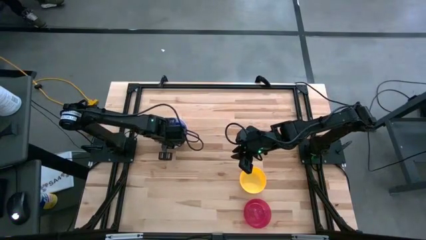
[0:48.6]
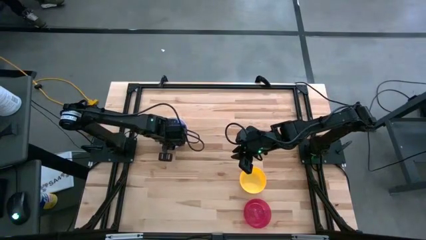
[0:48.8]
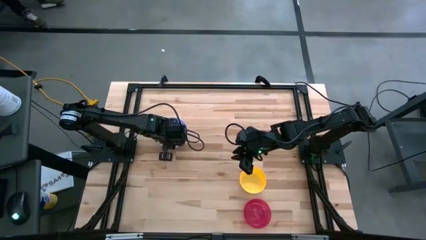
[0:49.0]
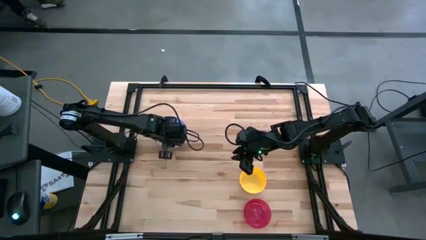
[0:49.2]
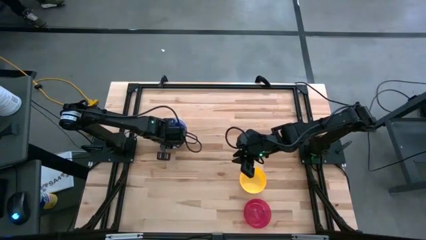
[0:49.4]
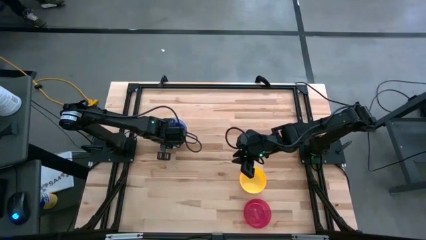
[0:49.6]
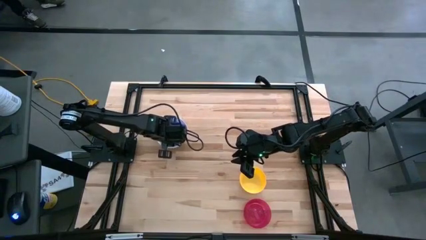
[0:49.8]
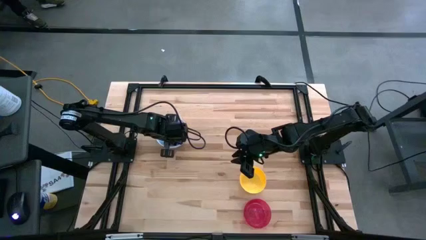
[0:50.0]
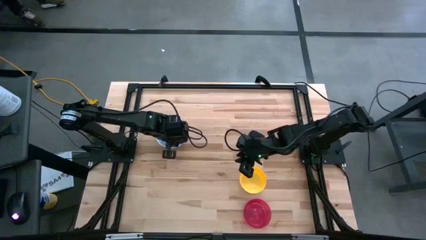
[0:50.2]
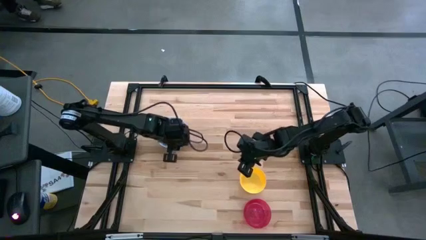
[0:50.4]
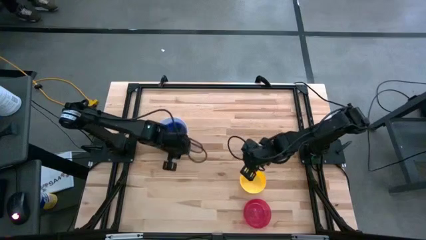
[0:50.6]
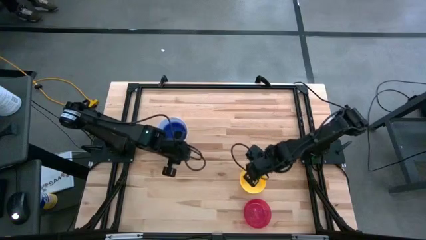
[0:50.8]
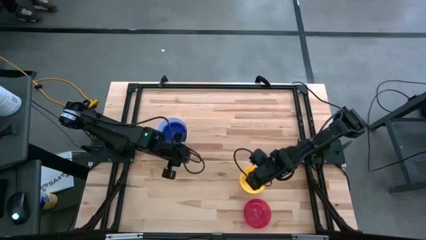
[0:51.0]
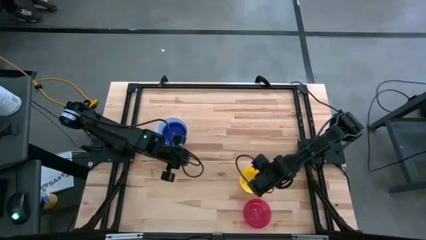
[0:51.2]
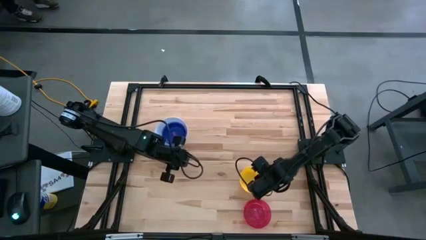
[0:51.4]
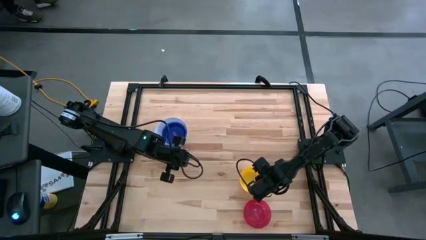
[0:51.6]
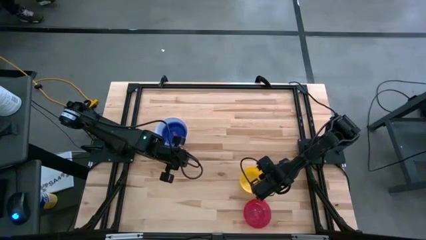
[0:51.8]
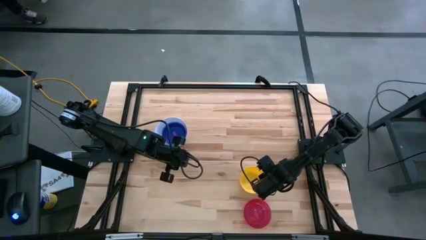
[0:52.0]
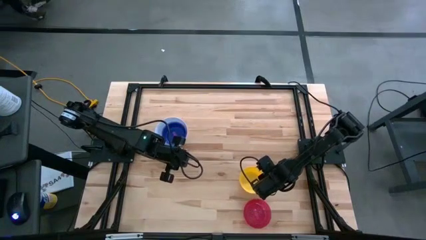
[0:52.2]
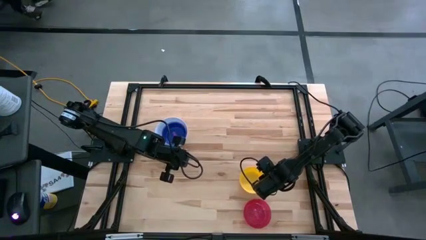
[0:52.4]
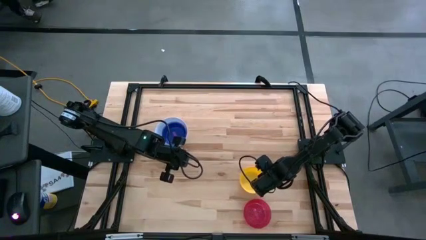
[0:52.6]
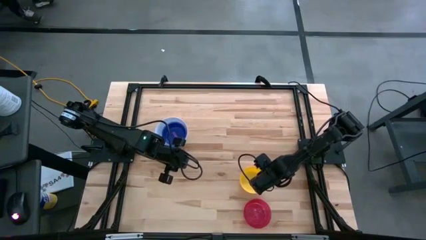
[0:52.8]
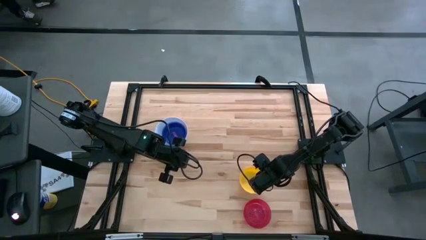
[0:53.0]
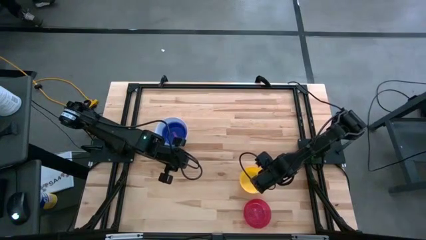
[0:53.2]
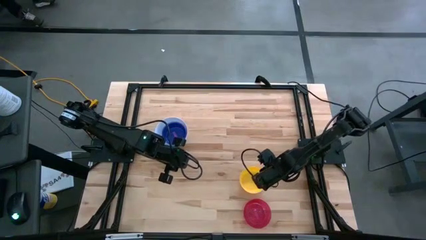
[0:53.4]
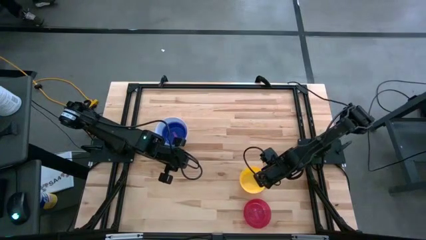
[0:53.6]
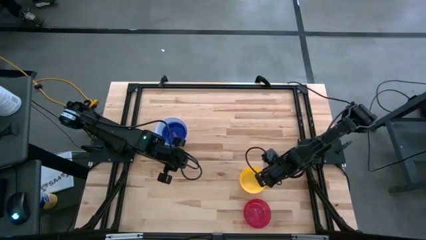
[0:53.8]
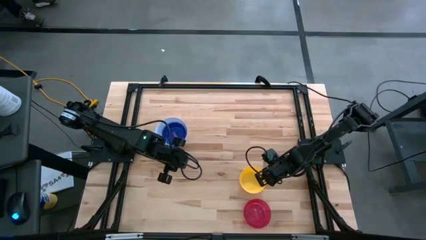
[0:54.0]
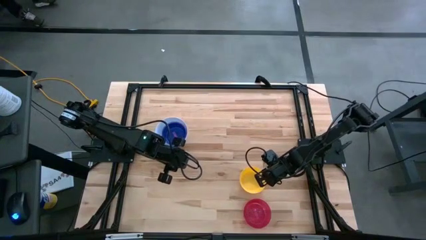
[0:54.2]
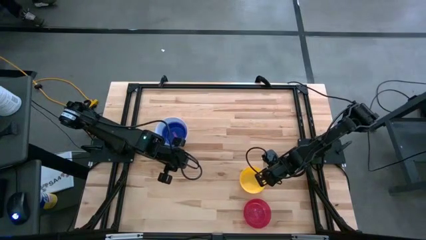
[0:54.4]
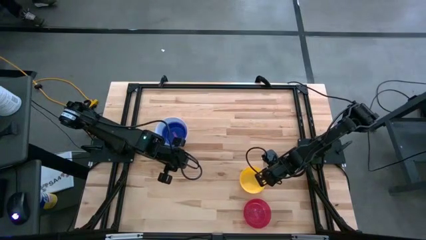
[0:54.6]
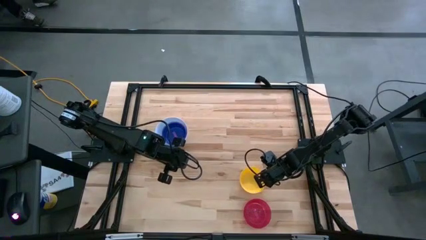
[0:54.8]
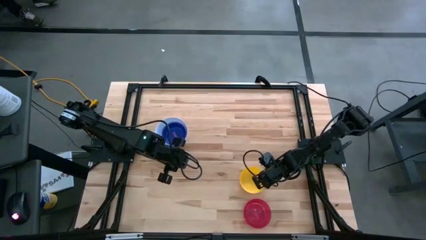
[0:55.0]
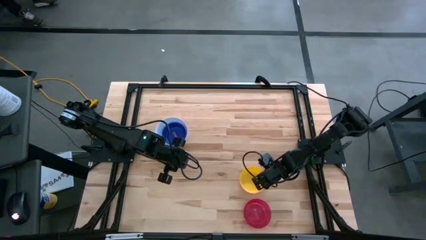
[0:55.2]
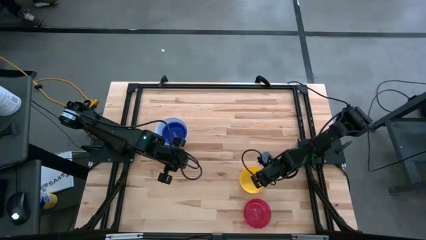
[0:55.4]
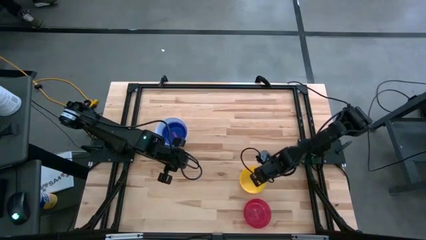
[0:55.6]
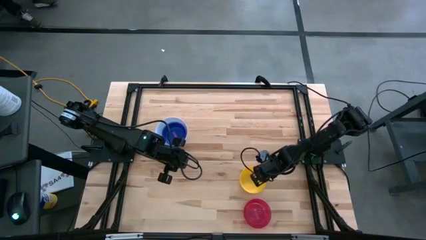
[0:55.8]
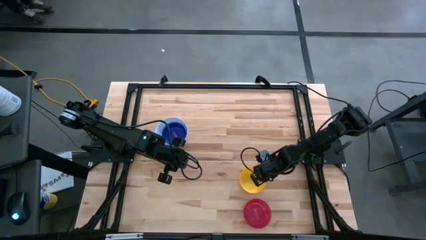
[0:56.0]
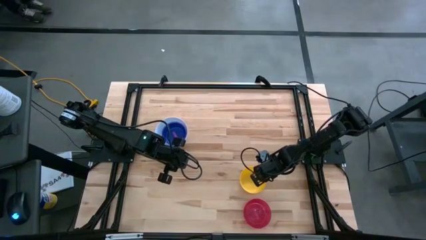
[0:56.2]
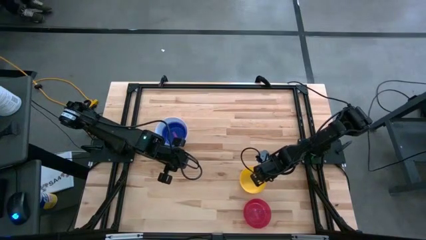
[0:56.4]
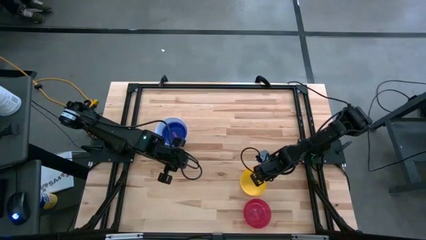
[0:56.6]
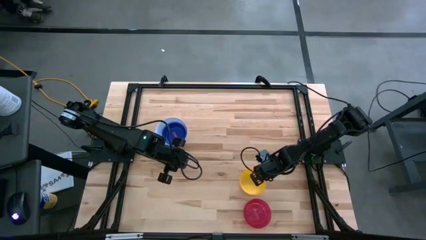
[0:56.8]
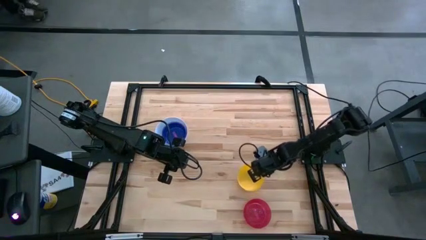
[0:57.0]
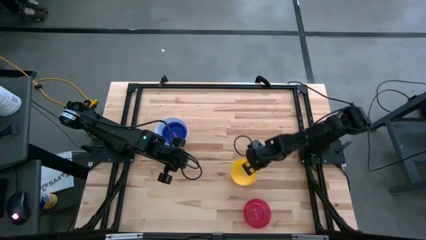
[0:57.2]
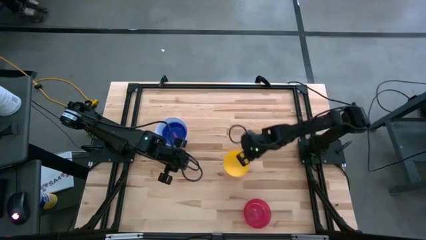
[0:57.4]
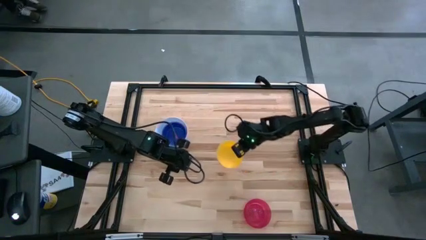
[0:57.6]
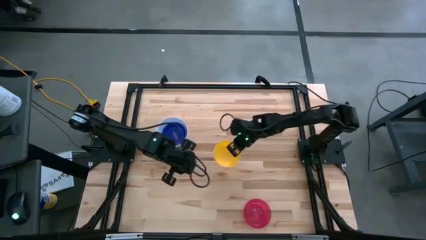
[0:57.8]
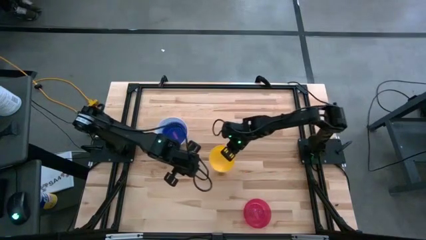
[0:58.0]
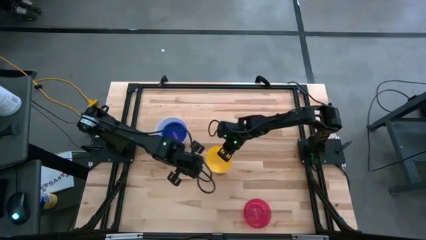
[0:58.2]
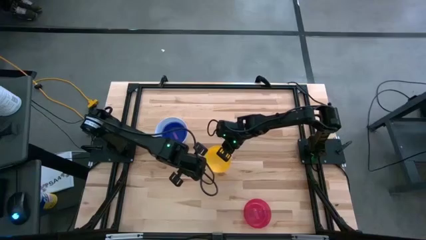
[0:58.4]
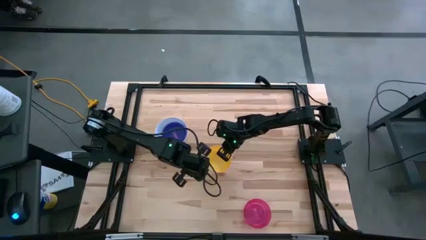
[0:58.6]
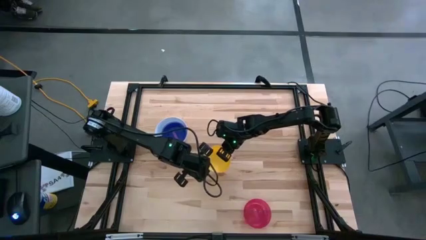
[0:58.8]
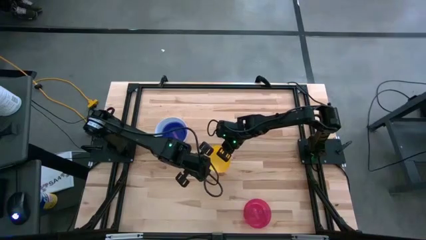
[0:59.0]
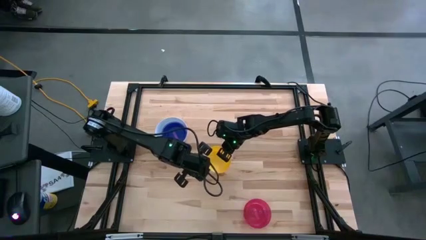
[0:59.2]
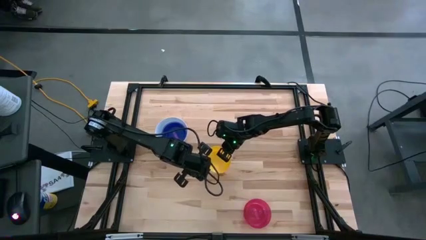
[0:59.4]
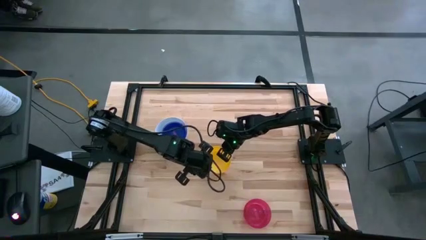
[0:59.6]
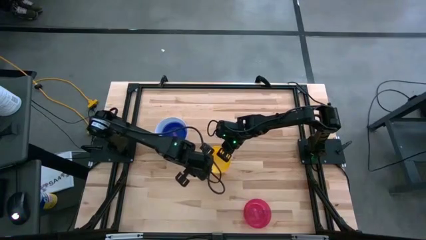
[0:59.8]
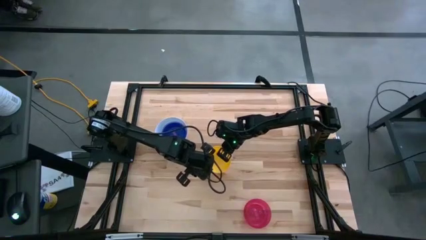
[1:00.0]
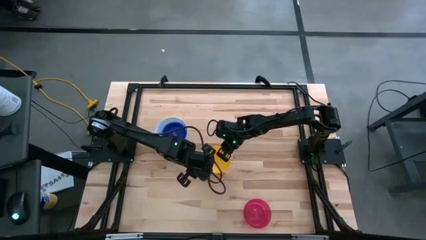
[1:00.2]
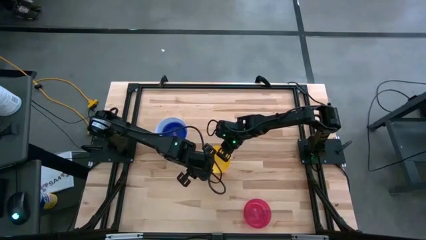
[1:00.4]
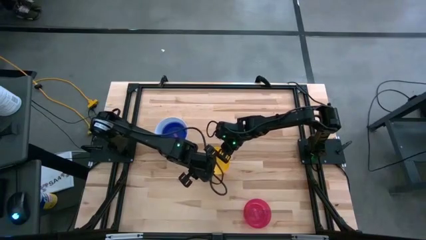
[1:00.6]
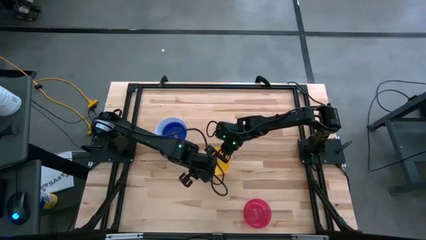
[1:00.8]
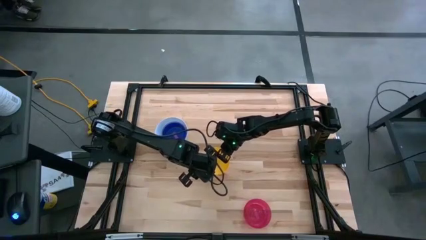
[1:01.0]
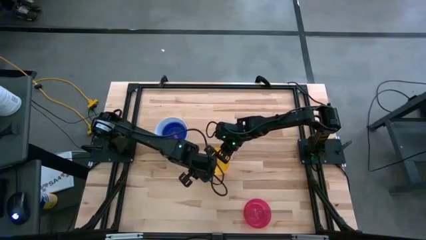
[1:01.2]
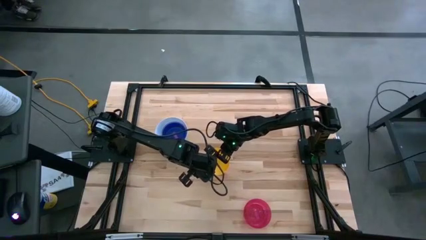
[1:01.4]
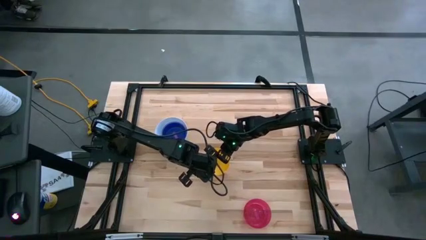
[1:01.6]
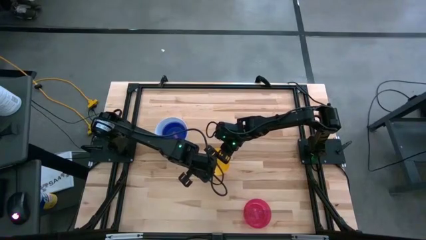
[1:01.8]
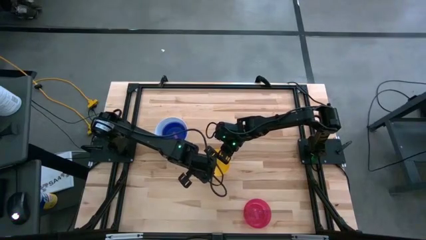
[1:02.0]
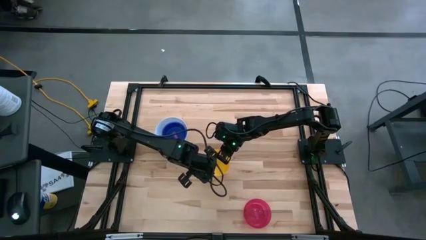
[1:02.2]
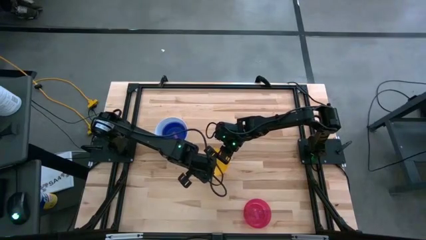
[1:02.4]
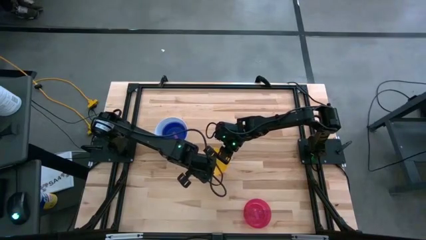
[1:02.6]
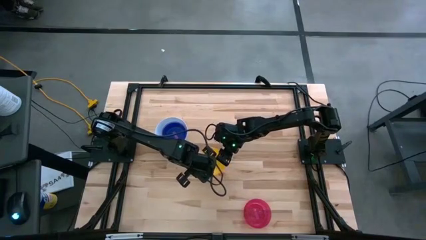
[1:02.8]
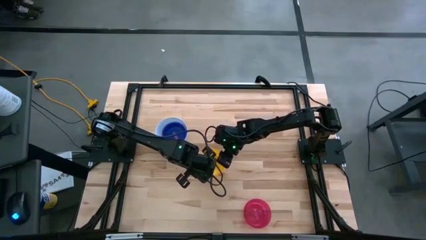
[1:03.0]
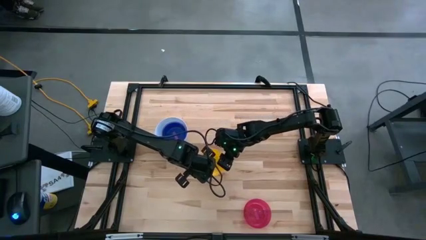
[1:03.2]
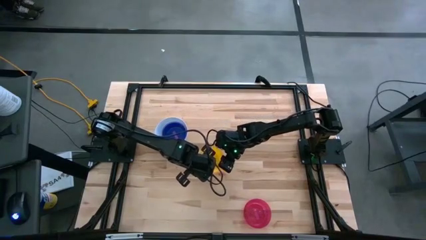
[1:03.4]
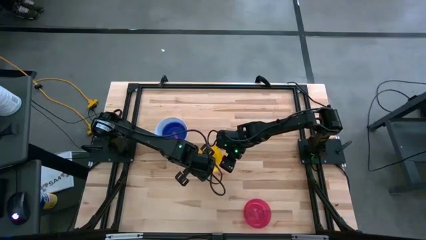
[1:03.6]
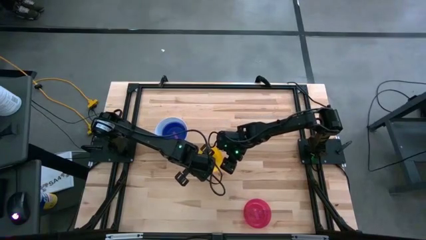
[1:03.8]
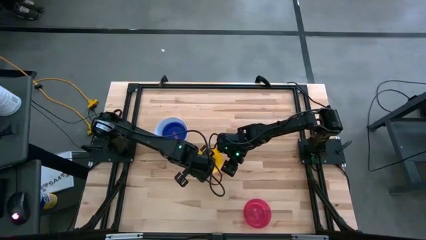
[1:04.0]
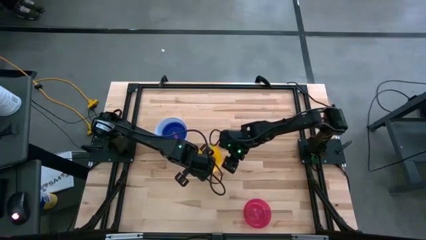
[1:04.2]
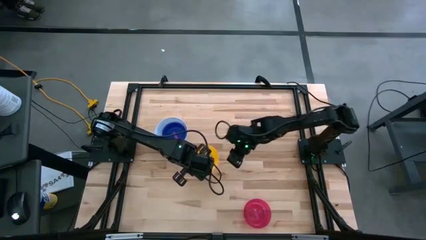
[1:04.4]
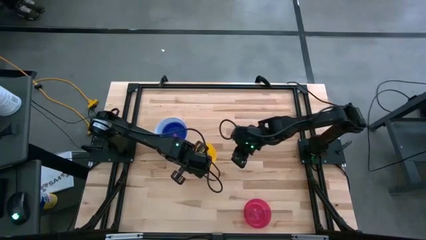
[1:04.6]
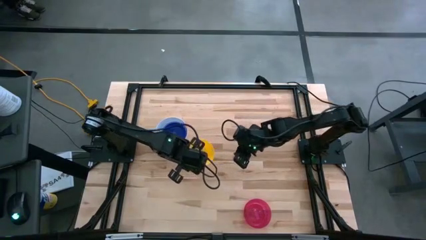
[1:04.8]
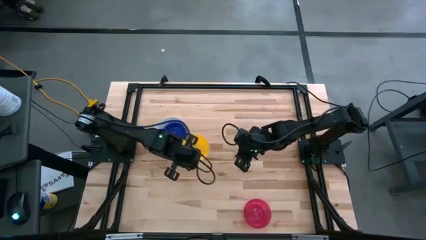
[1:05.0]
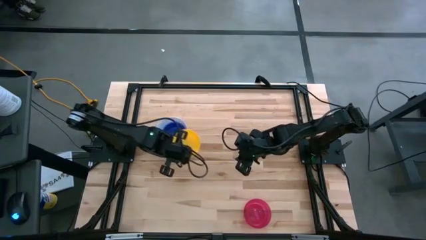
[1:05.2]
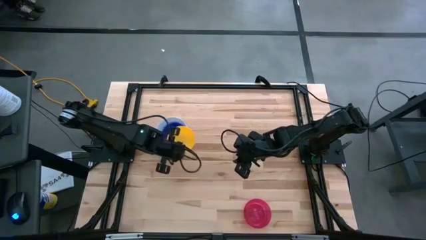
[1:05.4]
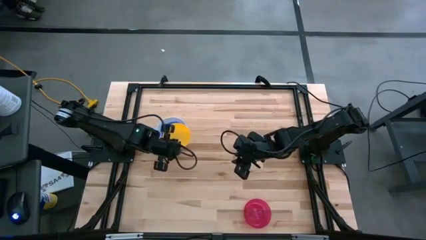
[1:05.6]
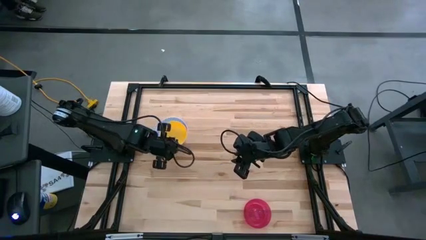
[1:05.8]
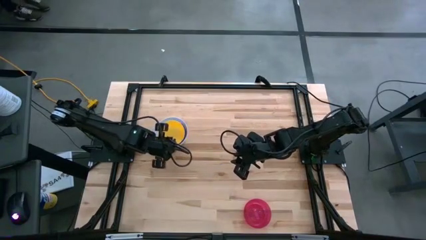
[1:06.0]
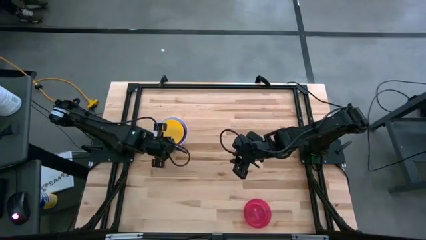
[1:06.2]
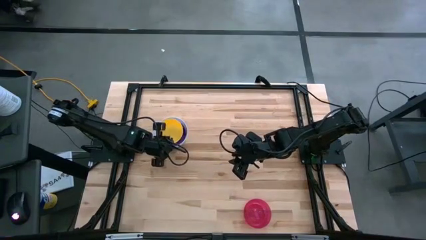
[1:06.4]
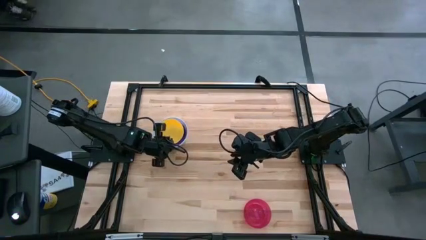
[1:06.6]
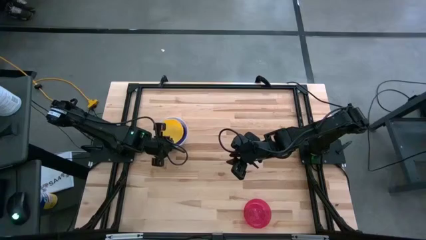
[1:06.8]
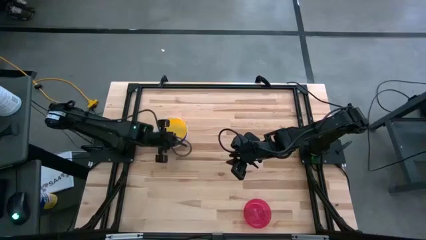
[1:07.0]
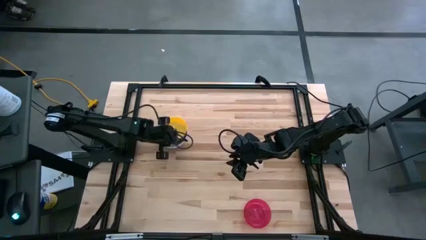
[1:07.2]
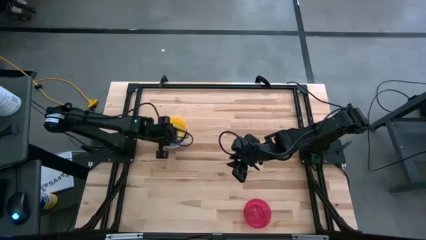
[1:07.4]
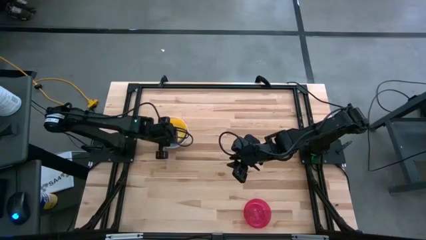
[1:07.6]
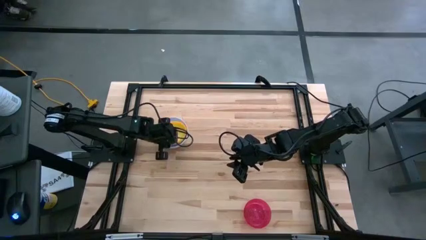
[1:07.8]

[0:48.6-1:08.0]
Stack the yellow bowl on the purple bowl
